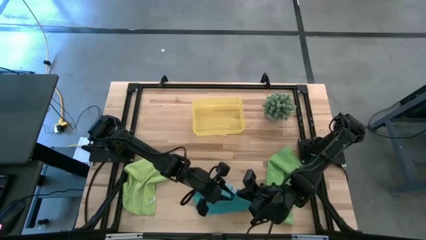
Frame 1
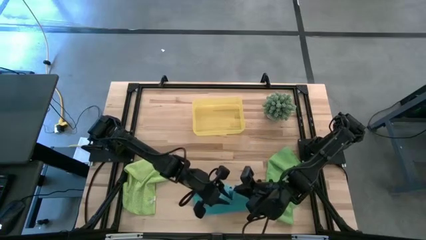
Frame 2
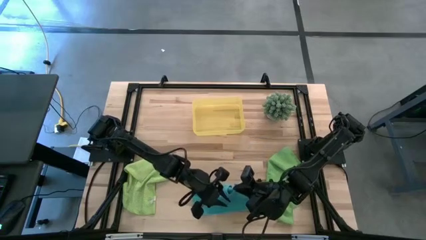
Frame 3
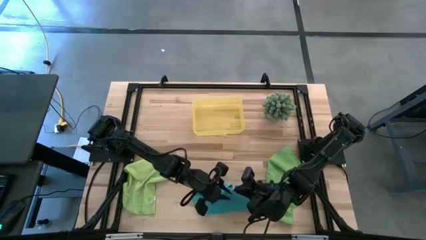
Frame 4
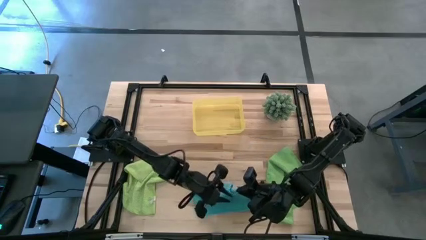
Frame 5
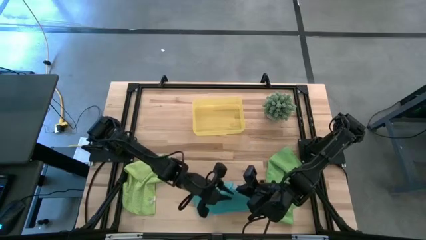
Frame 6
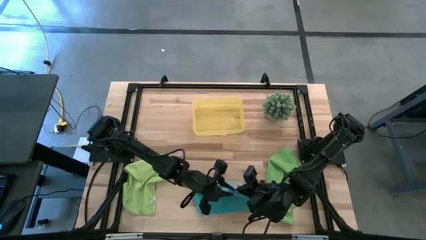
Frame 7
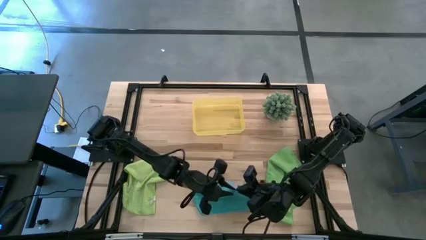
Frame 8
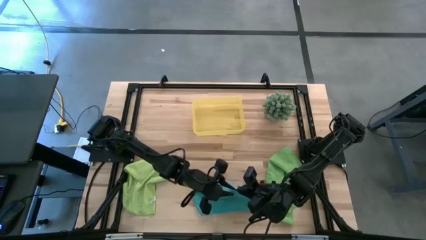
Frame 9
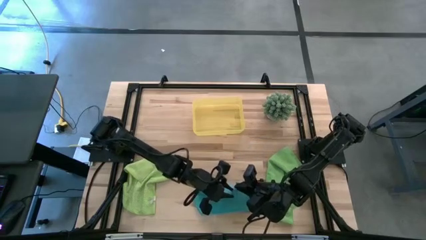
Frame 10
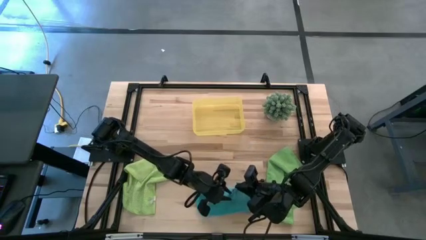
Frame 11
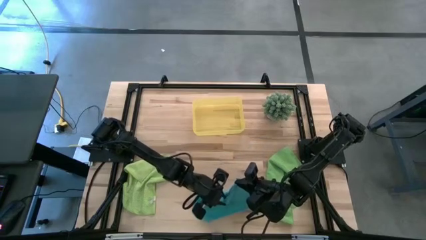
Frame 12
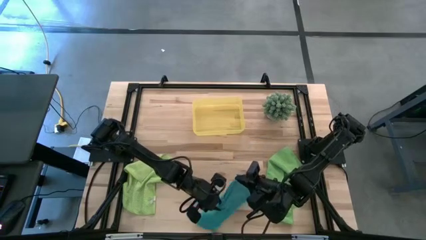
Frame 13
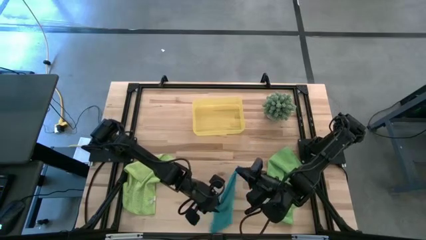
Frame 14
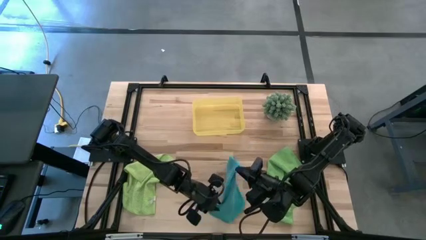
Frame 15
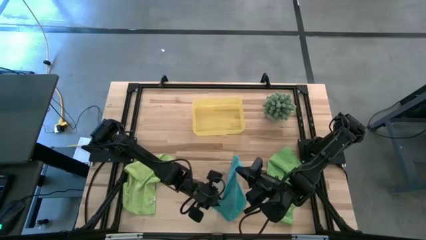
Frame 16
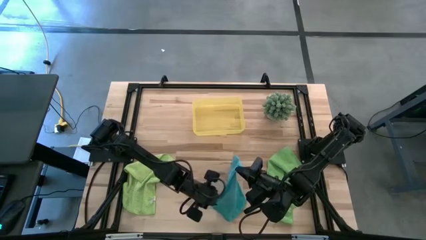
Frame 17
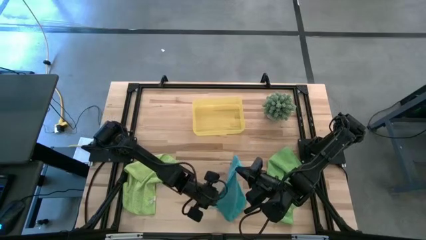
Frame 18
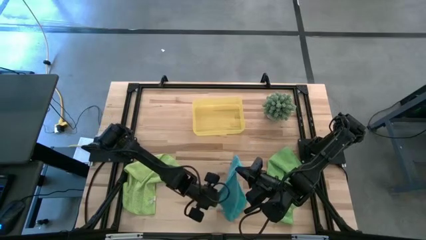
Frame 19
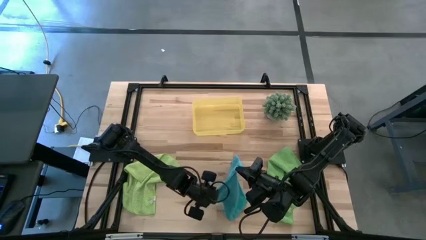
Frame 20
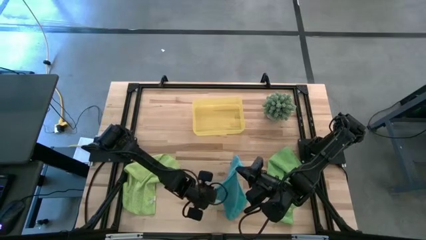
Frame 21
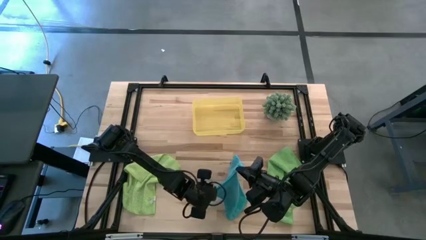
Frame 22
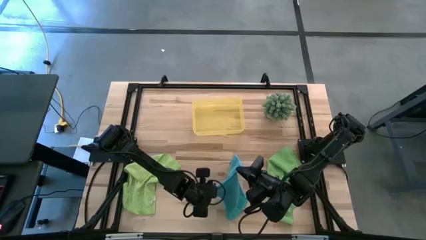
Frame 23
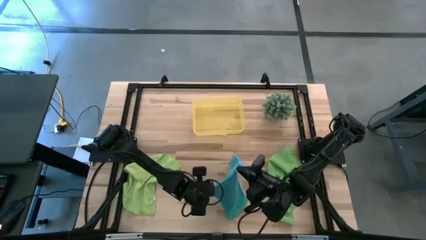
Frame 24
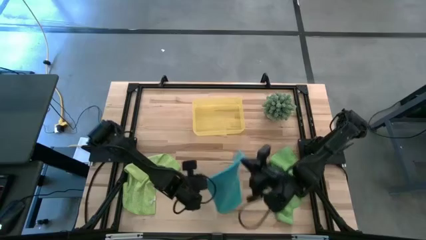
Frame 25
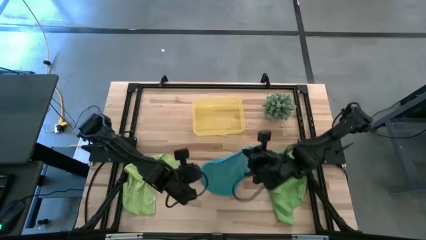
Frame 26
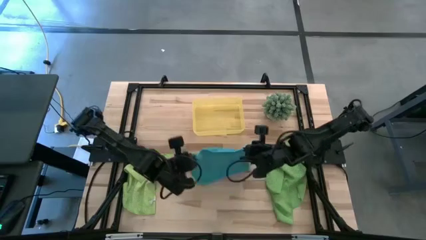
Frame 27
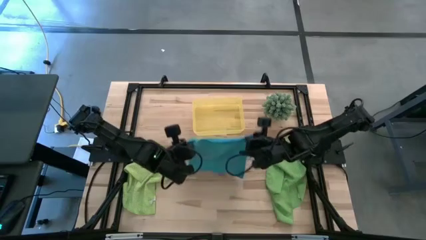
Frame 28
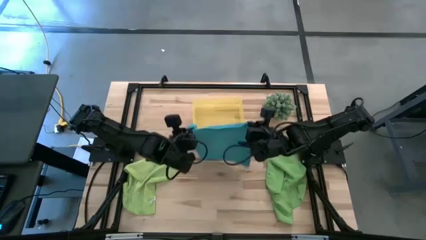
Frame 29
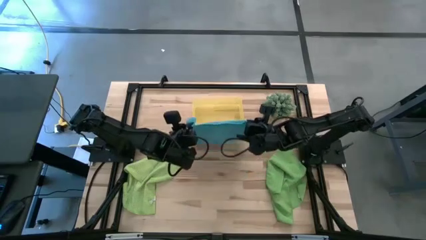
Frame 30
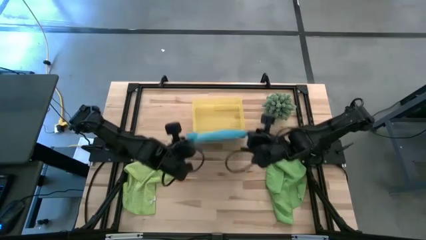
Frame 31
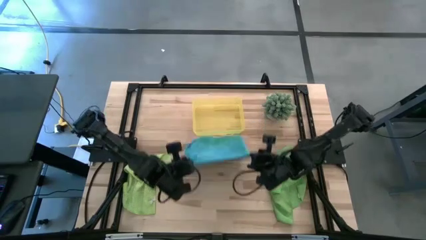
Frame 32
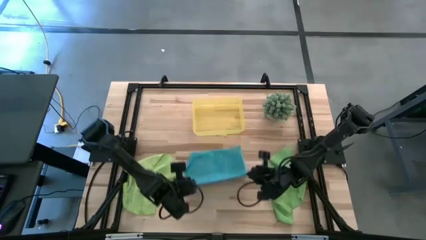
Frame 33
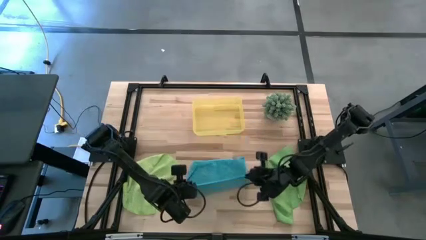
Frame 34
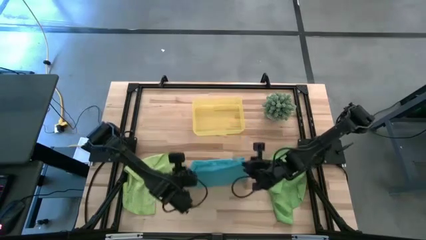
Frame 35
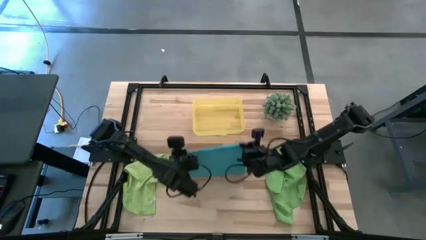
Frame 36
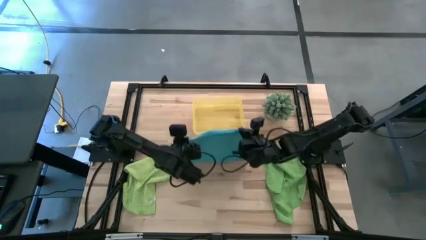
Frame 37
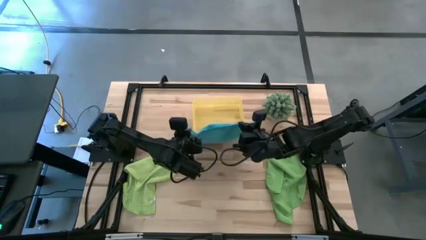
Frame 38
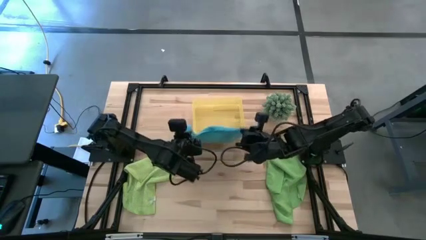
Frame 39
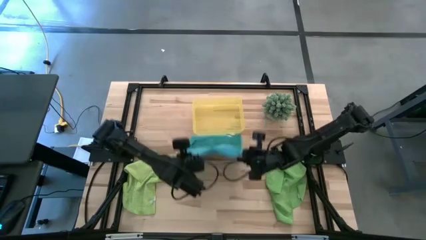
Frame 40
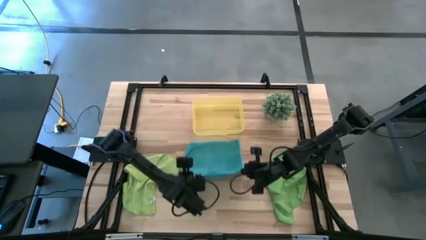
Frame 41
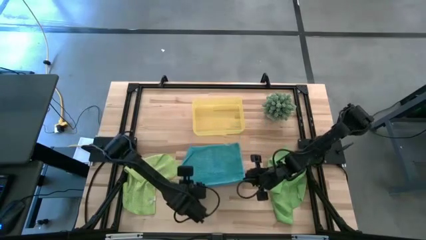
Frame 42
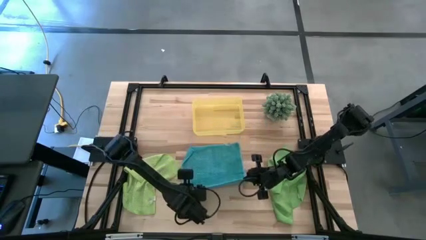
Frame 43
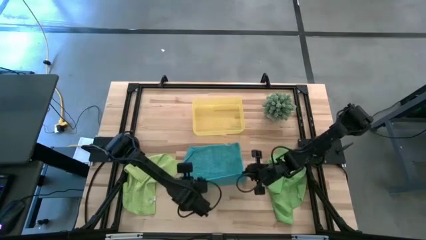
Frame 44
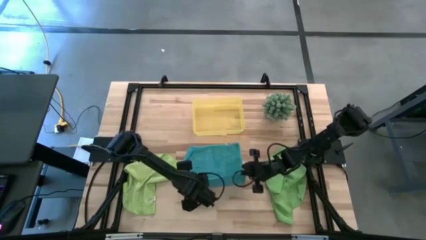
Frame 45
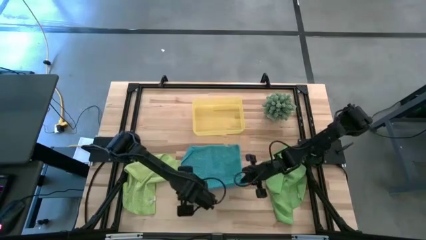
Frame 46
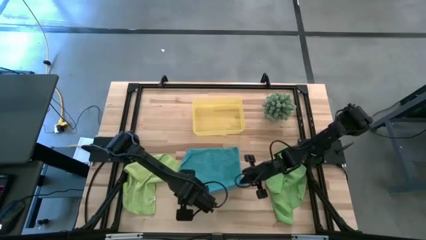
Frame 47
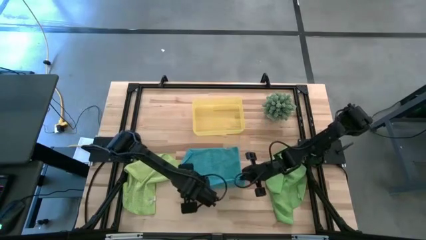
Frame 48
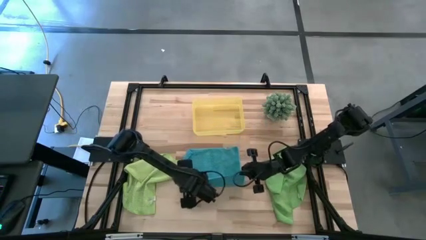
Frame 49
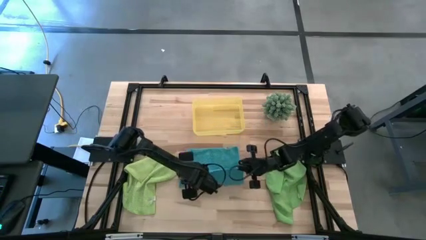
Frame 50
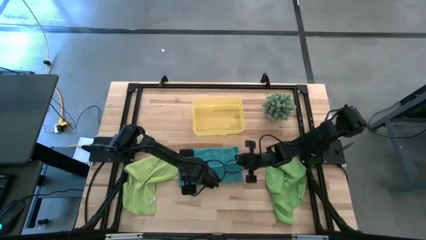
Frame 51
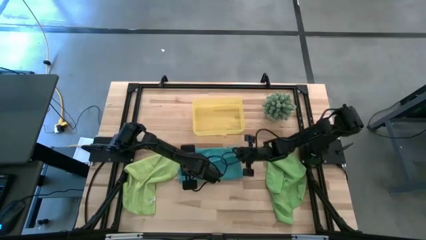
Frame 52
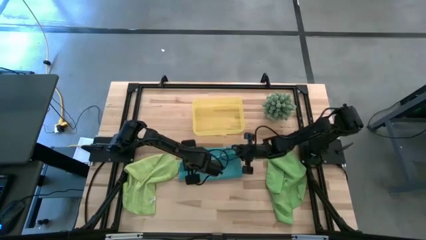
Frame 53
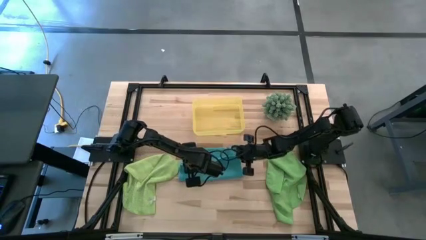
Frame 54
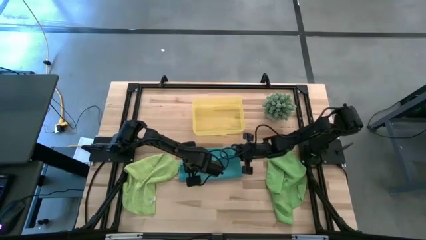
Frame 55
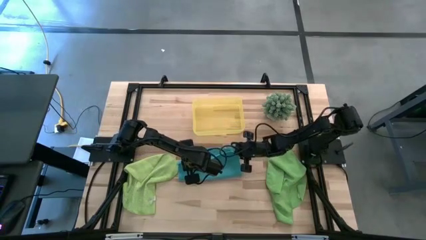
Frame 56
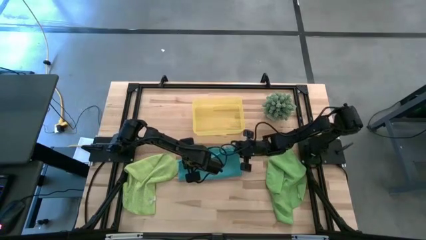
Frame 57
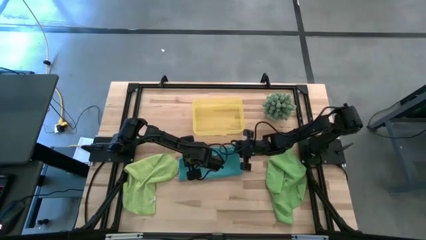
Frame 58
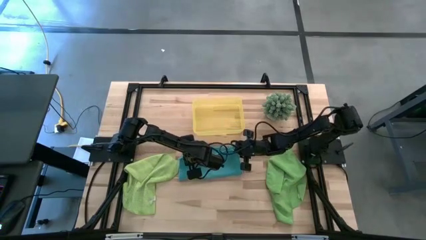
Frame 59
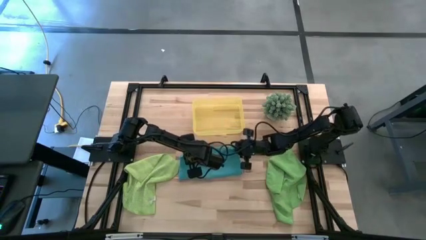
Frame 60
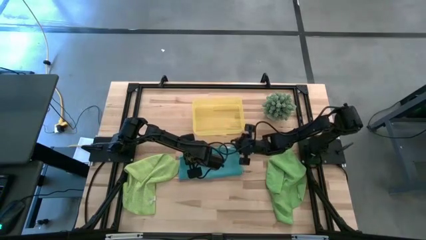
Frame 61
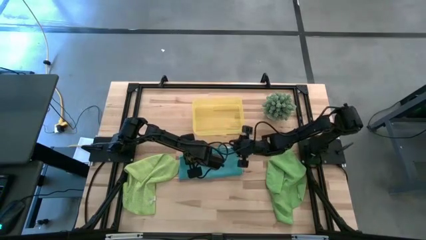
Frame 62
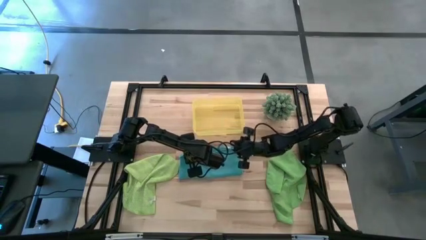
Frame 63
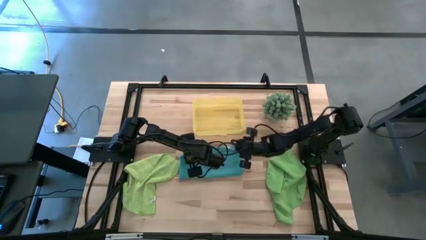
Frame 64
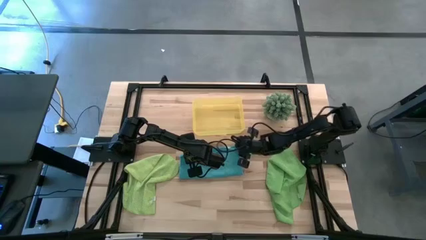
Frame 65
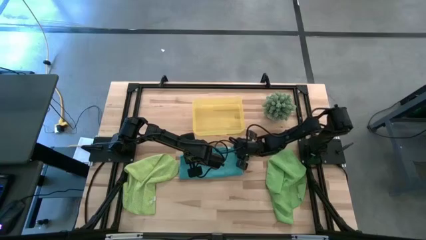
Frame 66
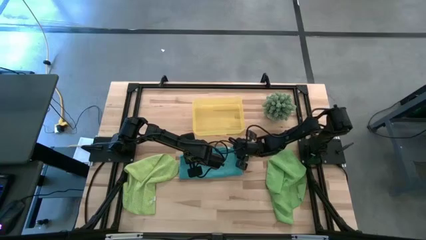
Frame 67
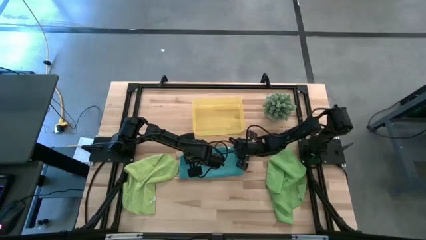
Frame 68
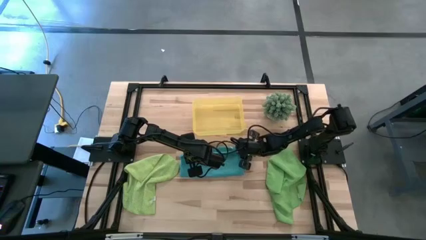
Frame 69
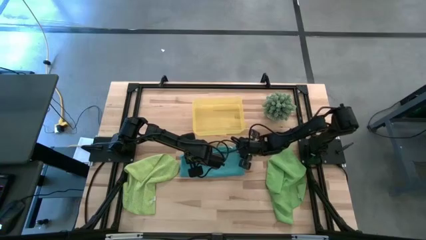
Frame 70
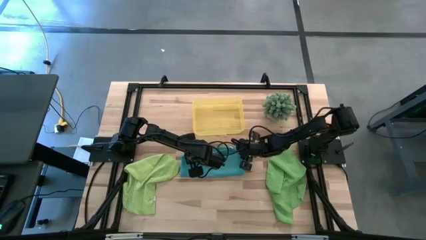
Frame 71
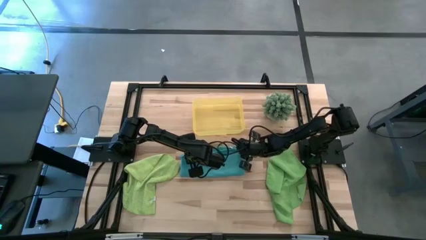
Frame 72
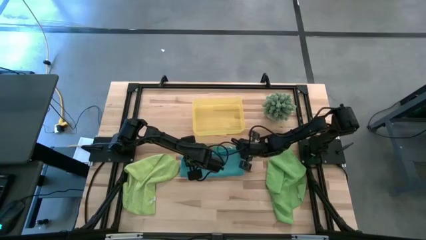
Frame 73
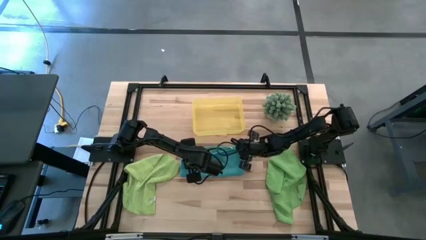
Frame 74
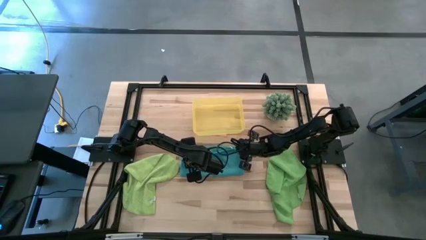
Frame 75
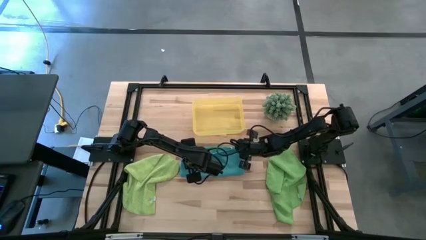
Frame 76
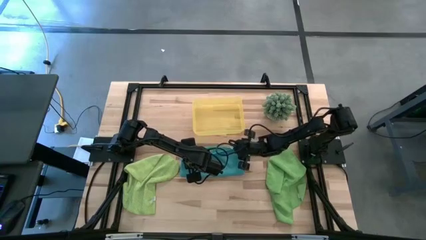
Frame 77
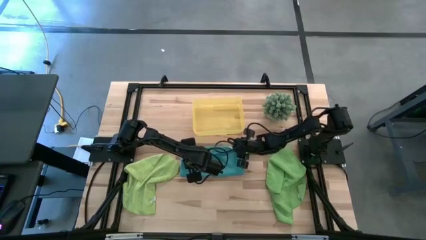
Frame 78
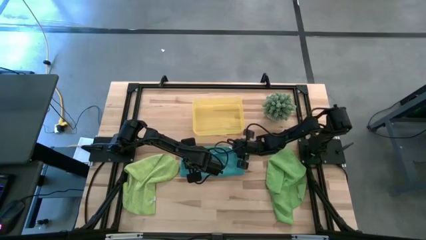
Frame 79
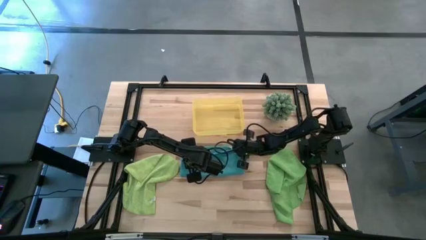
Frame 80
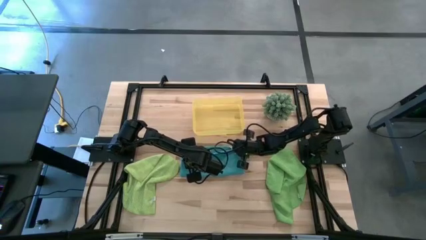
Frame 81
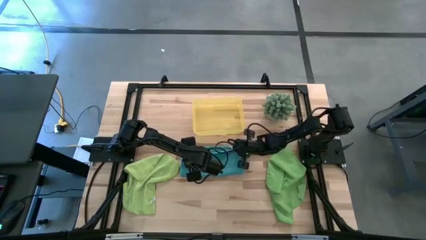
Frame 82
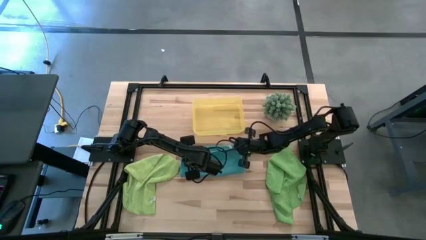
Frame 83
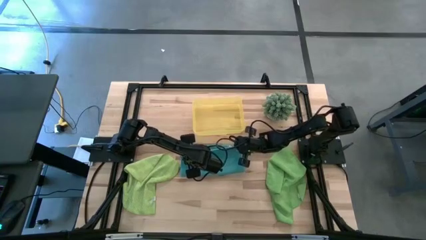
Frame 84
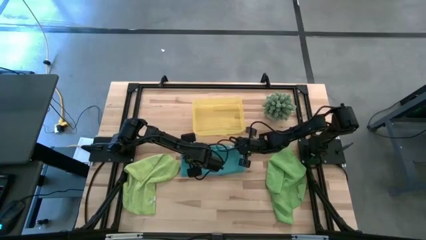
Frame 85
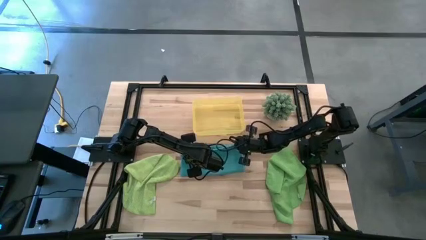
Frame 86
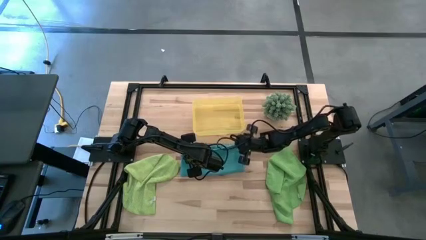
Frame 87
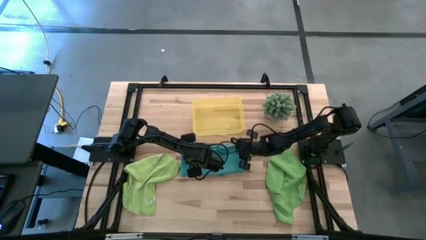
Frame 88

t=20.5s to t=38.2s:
Task: Roll microfiber towels into tight, uniform cylinder then place into a basket
Fold the blue microfiber cloth
